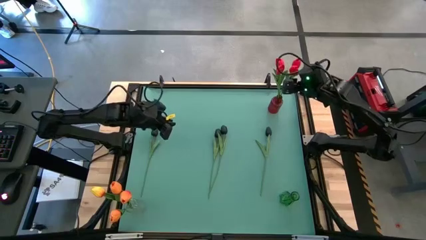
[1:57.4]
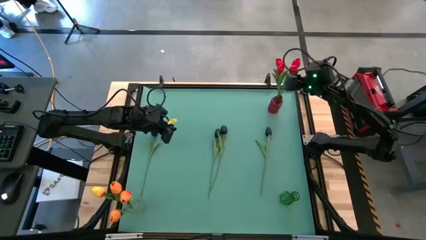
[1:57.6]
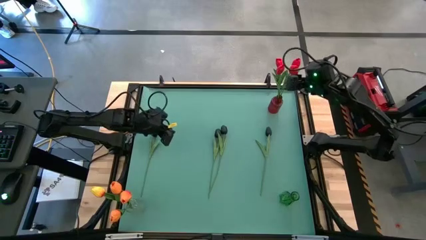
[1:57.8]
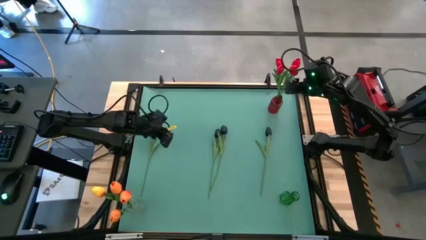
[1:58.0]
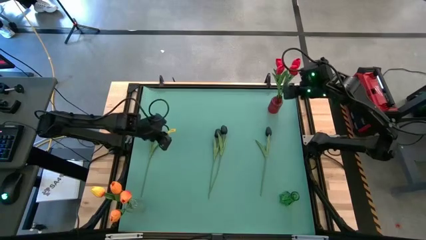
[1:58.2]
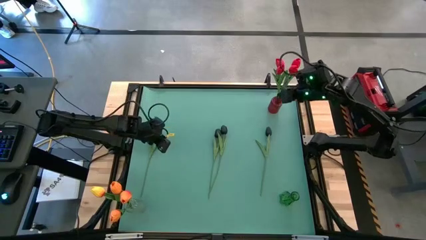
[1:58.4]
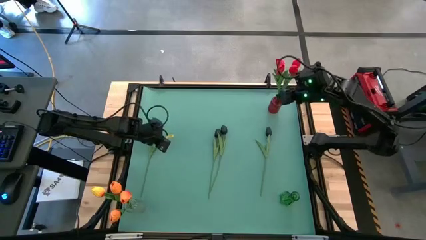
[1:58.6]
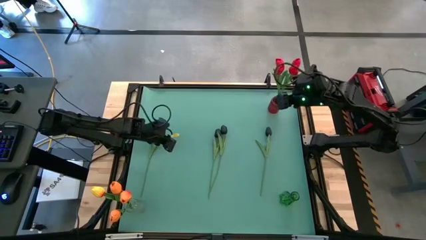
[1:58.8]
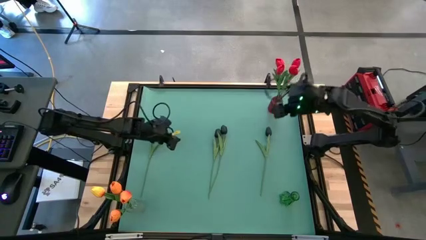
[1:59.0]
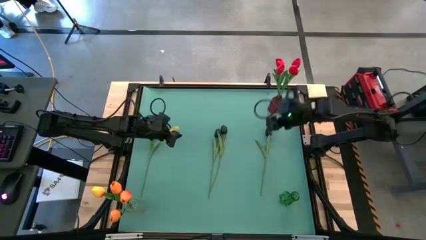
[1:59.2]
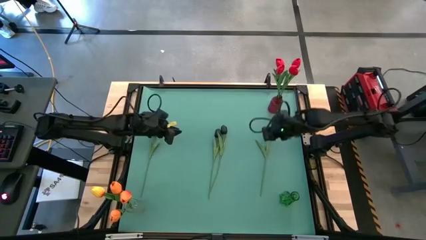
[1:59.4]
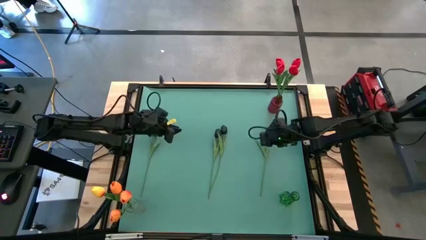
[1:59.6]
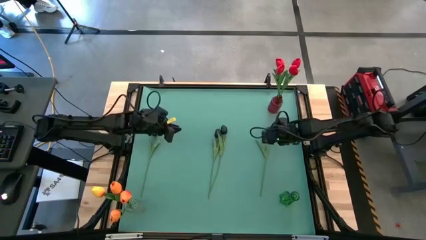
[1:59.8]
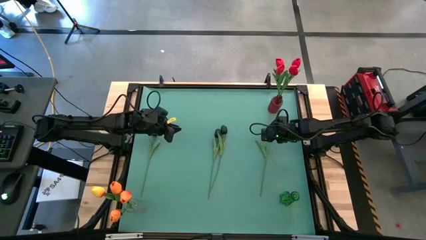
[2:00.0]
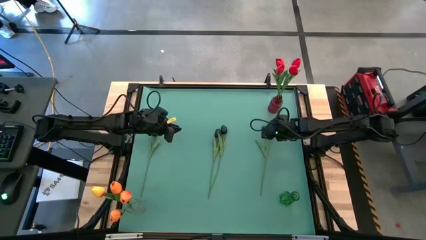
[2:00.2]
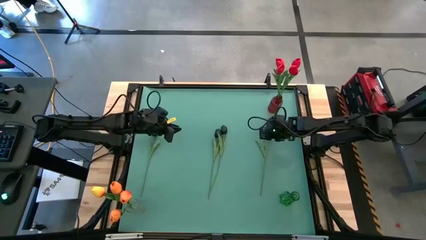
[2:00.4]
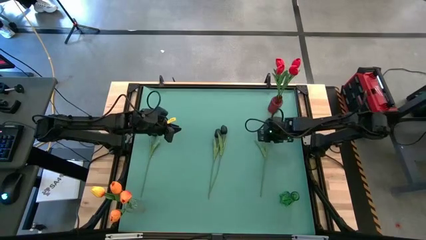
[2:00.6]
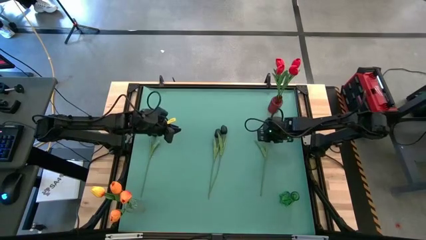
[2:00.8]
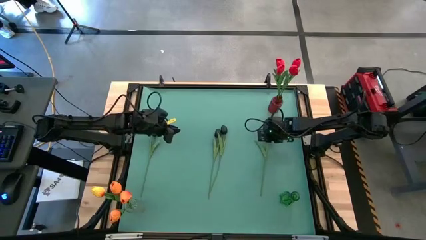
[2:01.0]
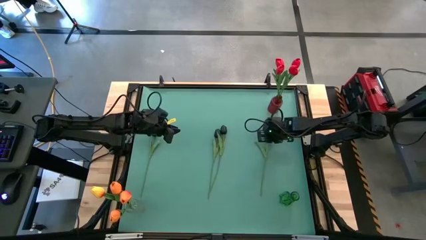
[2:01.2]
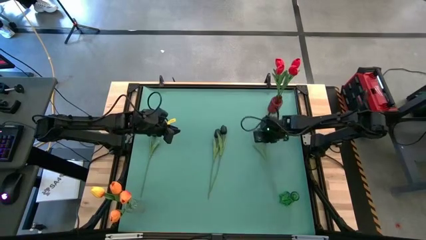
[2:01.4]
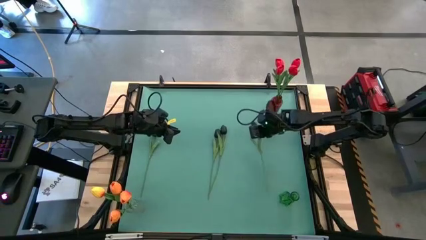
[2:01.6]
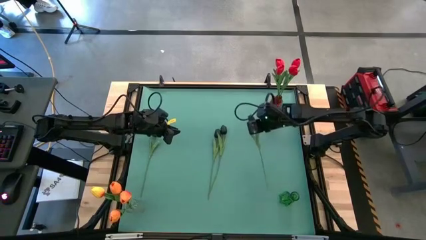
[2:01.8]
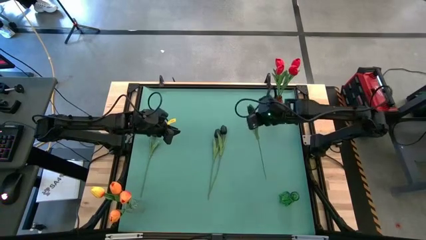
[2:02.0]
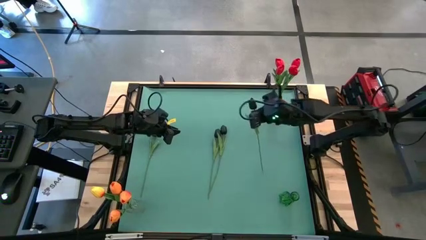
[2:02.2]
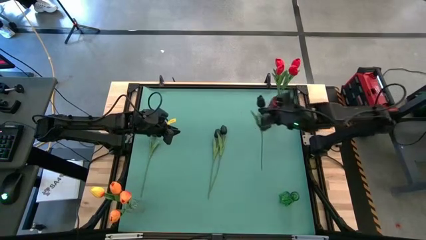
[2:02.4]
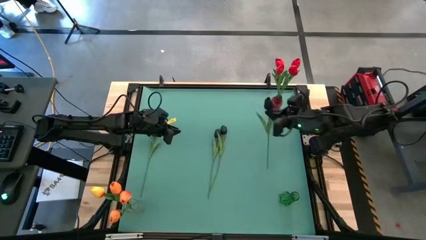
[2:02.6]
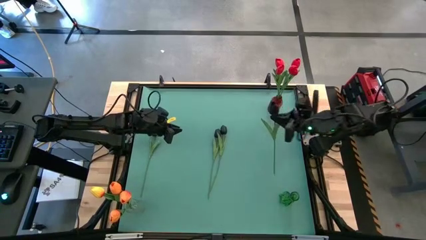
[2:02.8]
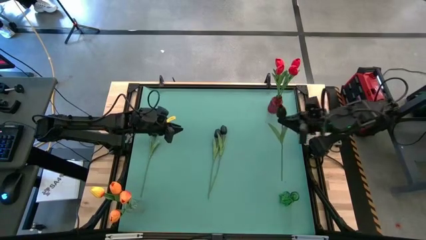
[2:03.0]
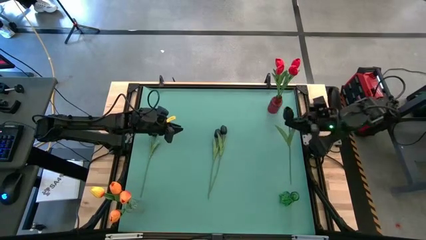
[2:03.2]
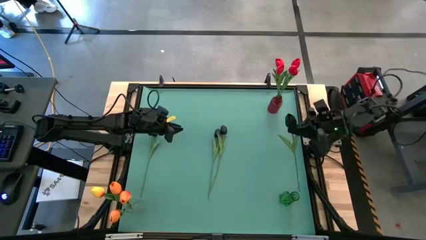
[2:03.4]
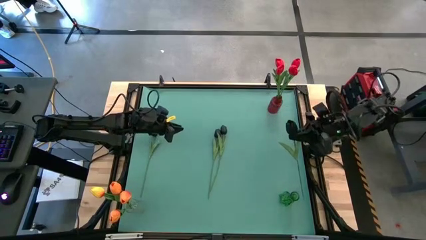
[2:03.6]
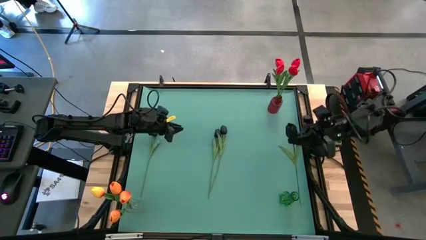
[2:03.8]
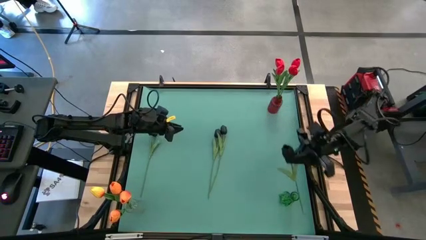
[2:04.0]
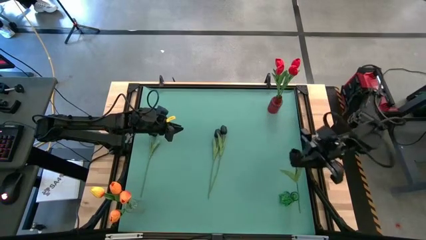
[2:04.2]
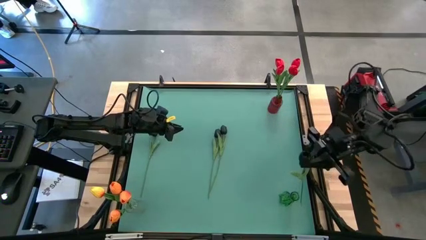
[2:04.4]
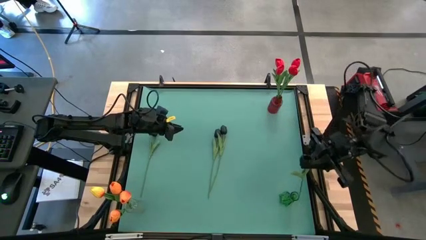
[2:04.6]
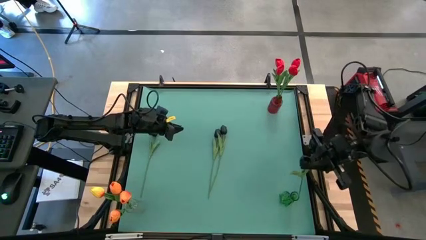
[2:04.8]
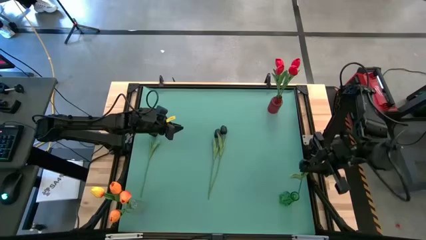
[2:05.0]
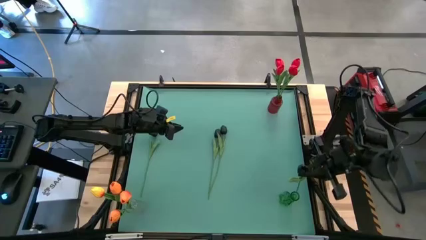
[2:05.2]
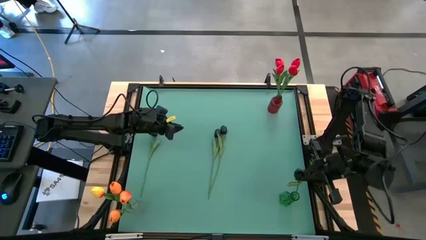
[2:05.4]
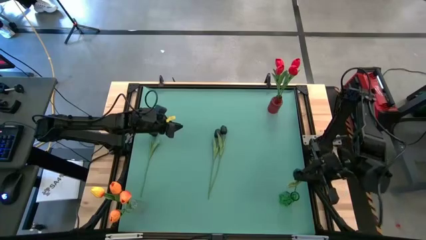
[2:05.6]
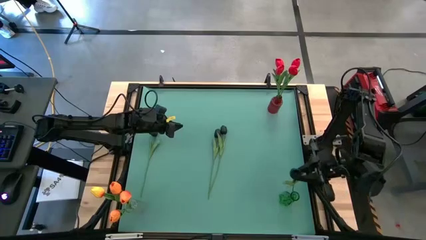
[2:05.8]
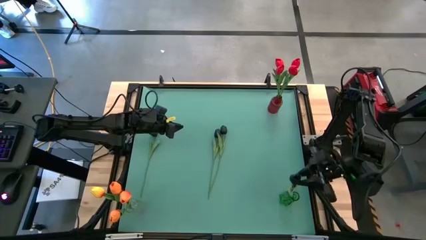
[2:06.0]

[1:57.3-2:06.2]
Task: Sort flowers into vase by color
Put the black tulip into the green vase

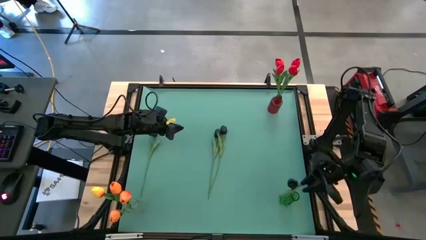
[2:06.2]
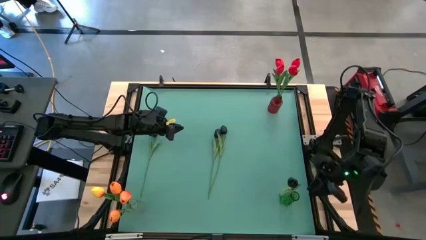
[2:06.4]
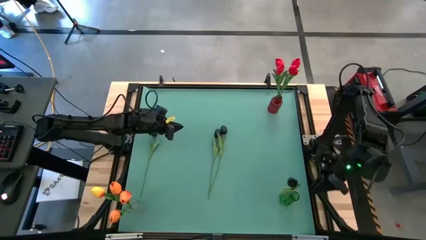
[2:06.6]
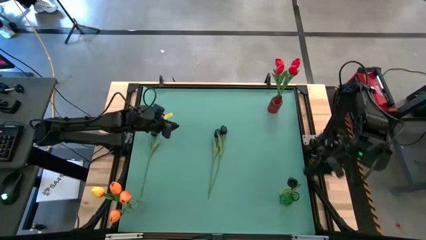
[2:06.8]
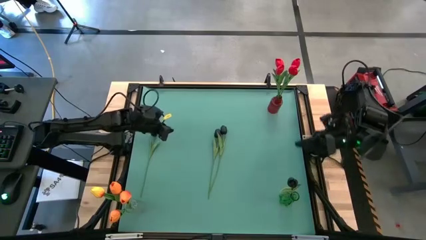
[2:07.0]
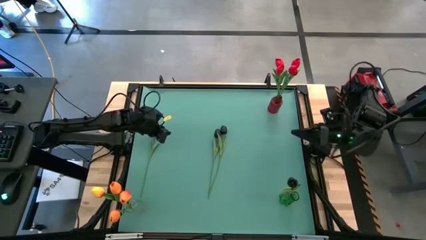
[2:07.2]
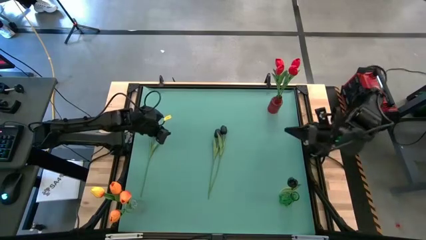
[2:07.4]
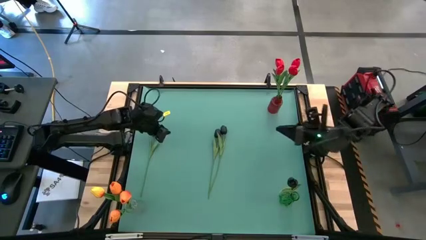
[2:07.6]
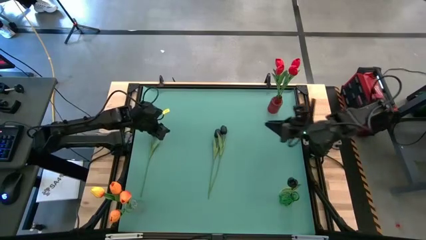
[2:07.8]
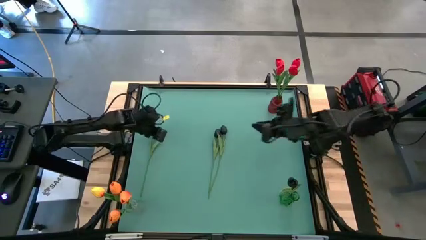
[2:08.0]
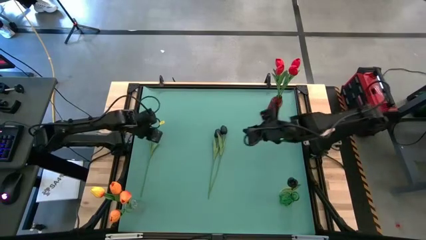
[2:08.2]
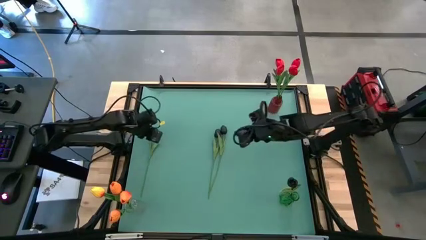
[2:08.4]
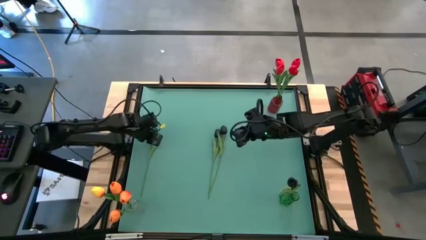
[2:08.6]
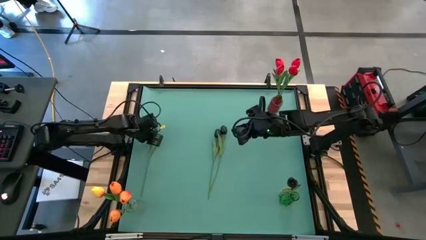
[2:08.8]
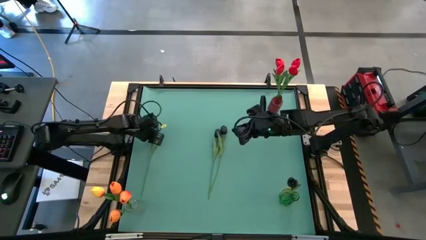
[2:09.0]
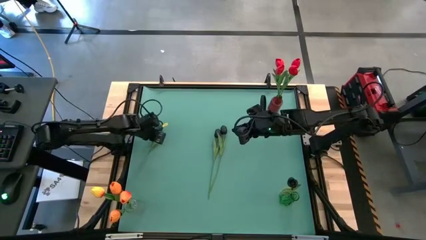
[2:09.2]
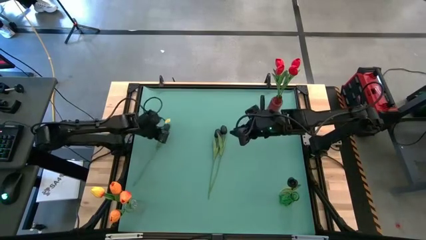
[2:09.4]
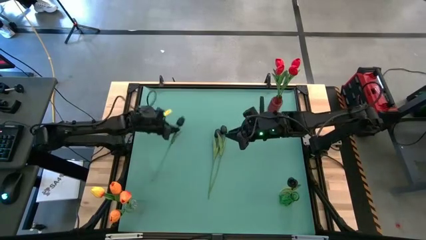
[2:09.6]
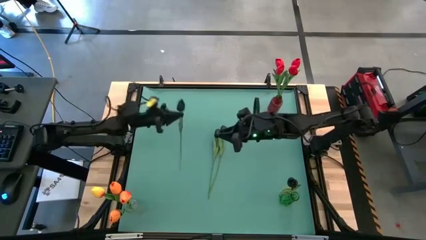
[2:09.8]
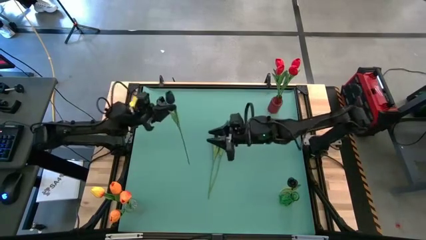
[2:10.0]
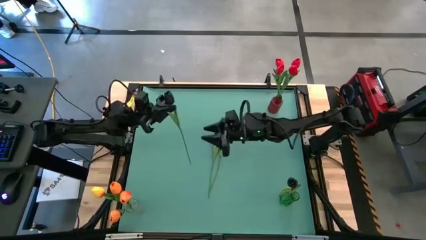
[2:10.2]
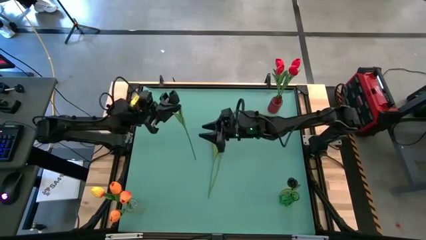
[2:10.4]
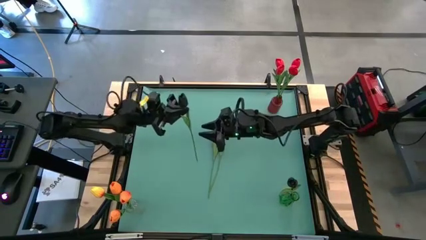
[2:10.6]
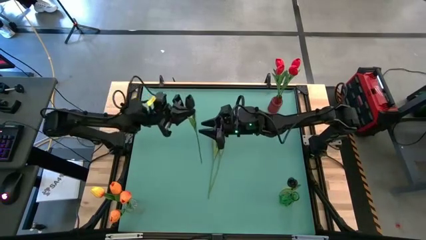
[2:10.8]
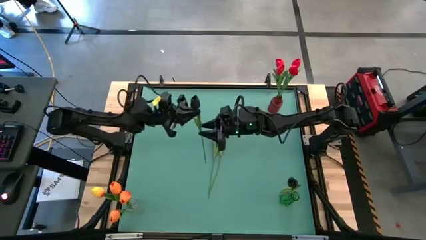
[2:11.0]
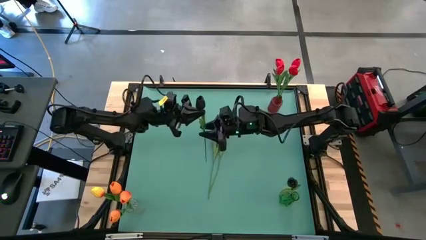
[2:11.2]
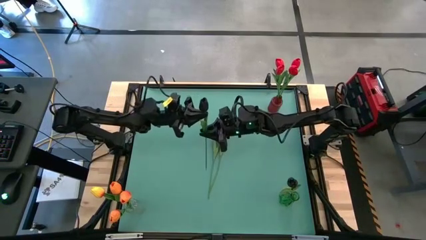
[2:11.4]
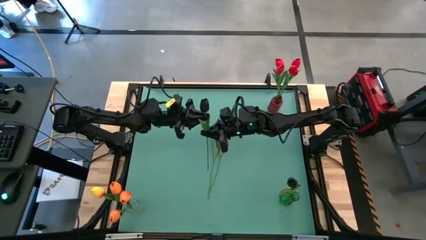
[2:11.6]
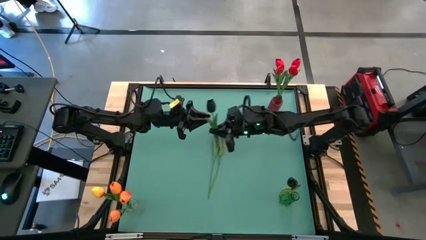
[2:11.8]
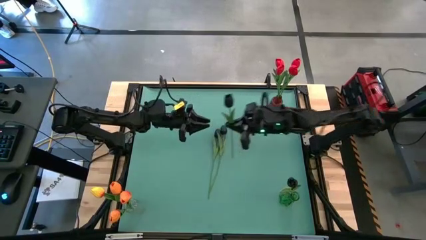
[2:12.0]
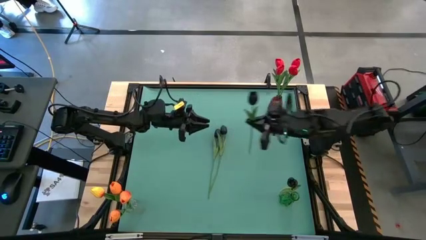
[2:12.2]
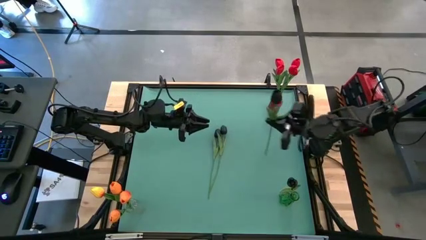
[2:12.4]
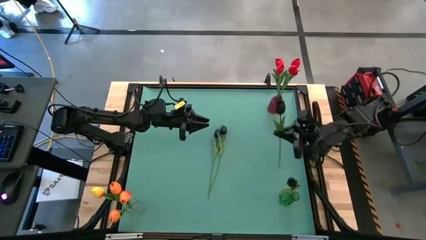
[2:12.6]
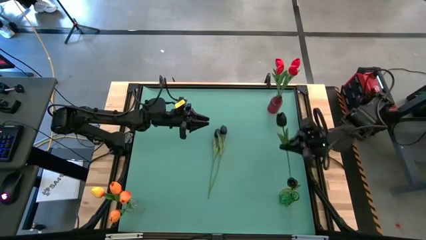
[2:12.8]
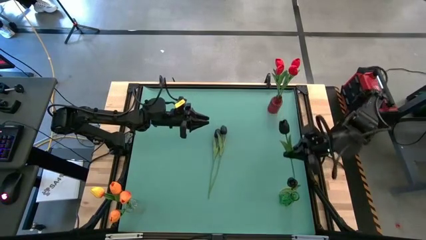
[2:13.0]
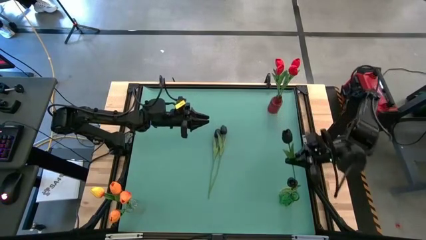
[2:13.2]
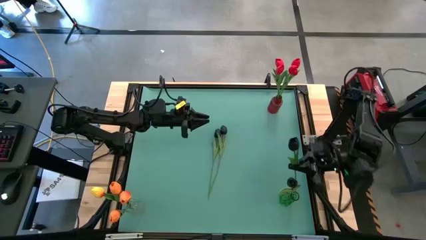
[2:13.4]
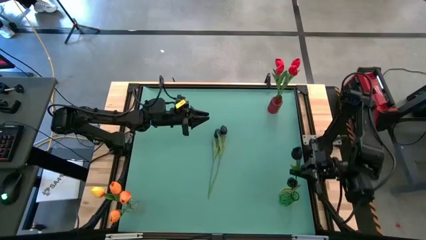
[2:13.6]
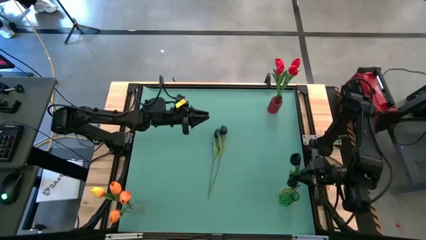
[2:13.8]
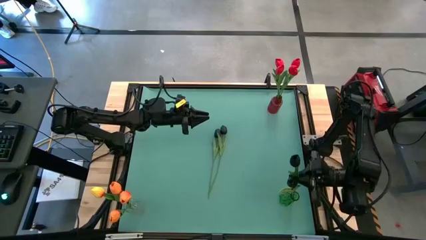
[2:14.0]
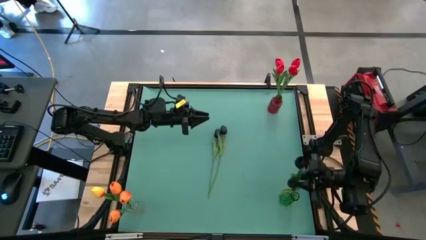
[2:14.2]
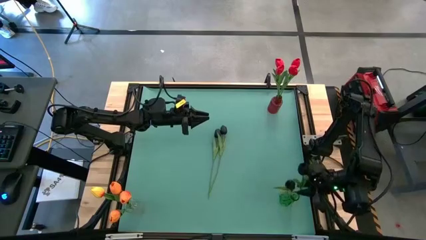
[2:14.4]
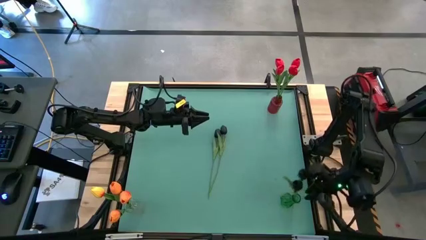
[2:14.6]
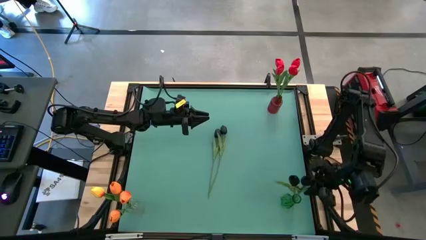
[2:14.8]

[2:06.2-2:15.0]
Put the black tulip into the green vase
